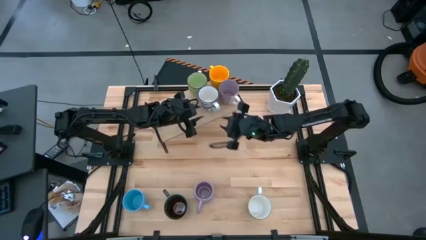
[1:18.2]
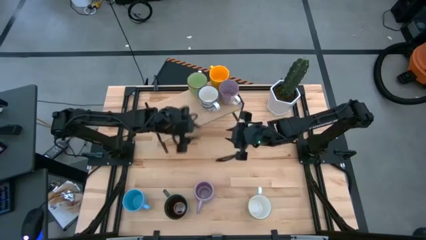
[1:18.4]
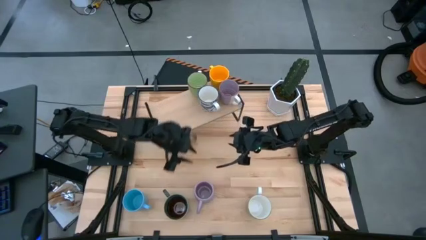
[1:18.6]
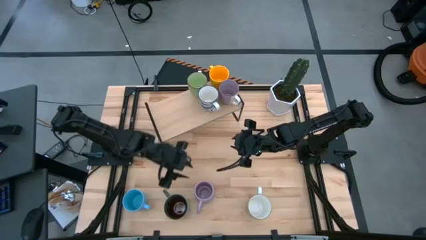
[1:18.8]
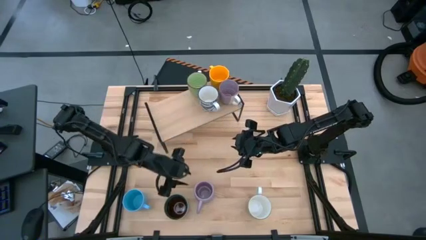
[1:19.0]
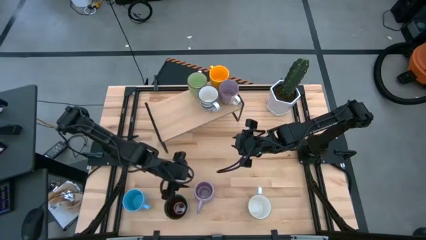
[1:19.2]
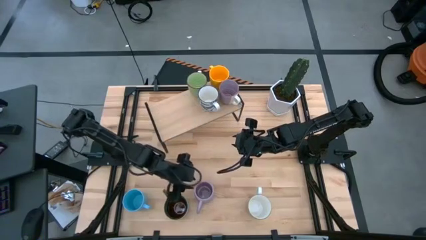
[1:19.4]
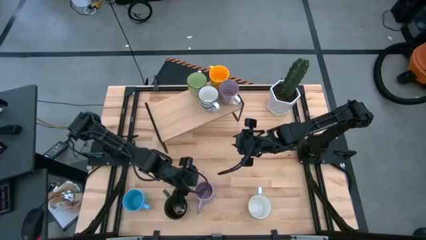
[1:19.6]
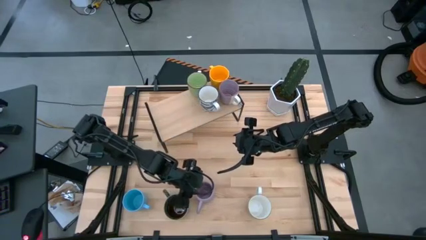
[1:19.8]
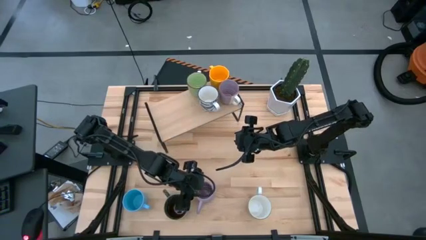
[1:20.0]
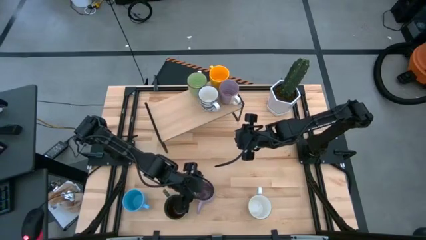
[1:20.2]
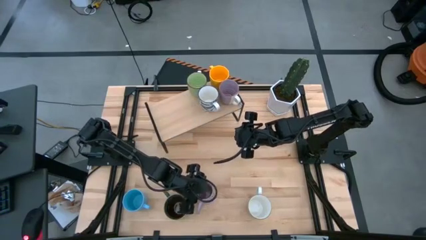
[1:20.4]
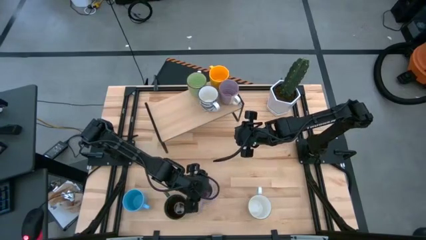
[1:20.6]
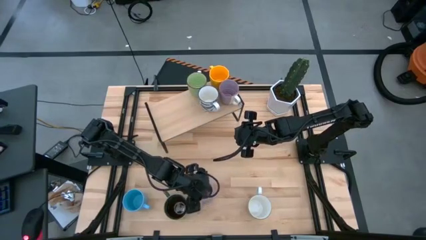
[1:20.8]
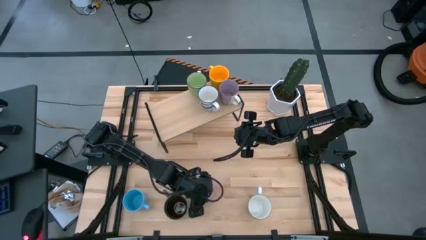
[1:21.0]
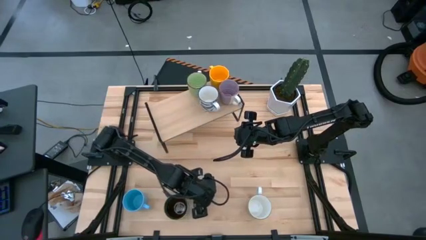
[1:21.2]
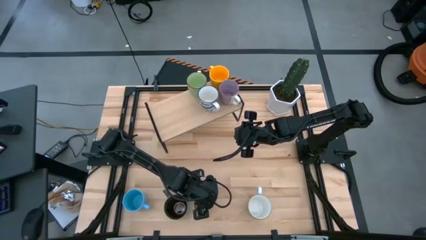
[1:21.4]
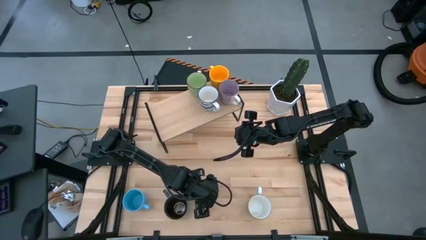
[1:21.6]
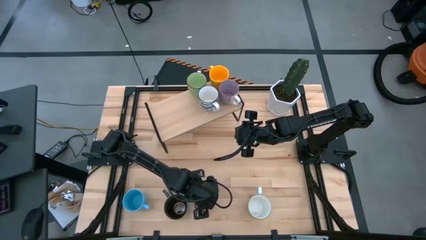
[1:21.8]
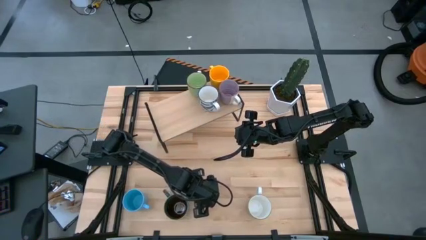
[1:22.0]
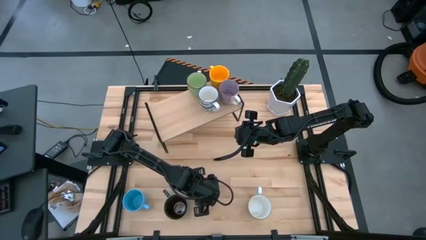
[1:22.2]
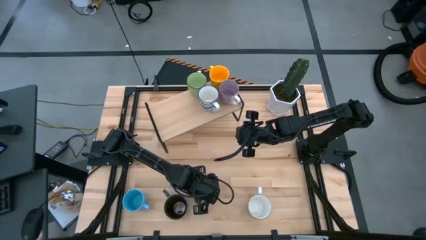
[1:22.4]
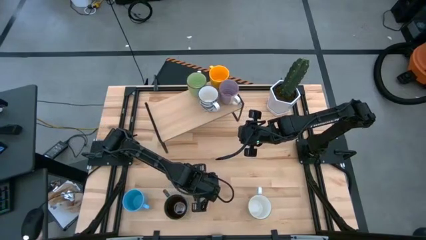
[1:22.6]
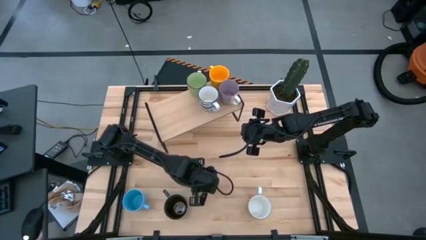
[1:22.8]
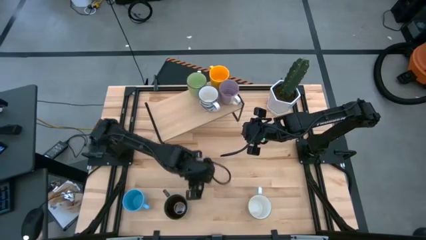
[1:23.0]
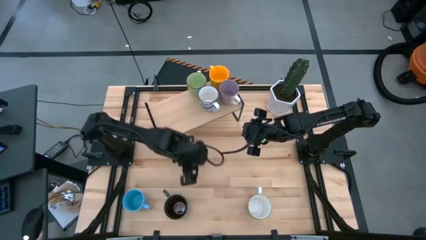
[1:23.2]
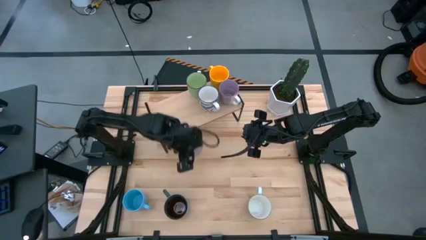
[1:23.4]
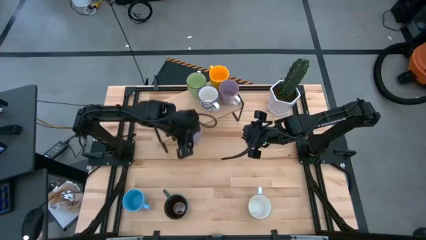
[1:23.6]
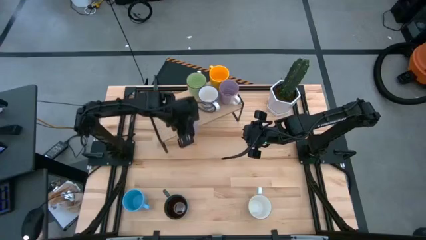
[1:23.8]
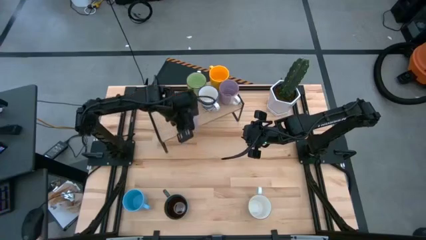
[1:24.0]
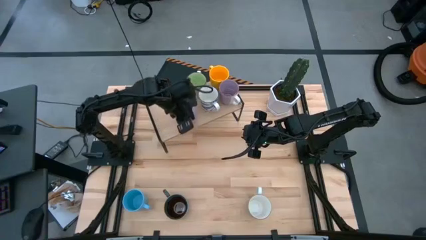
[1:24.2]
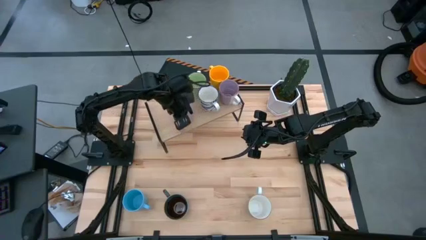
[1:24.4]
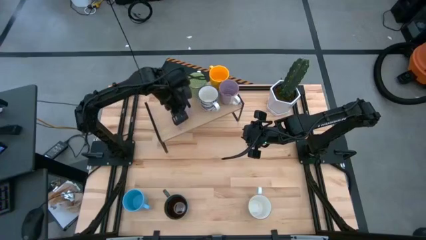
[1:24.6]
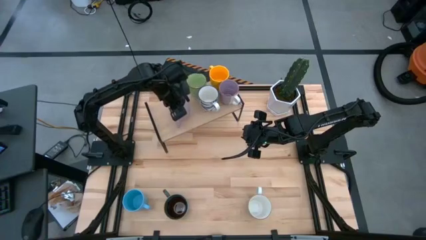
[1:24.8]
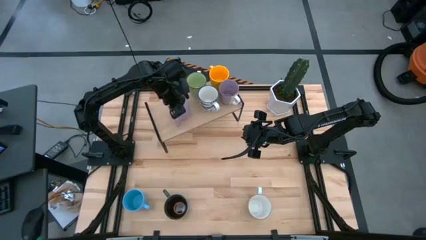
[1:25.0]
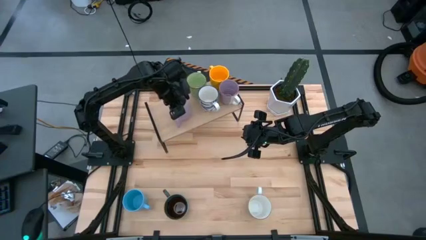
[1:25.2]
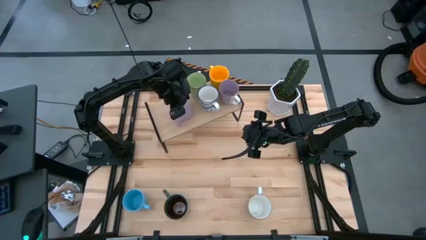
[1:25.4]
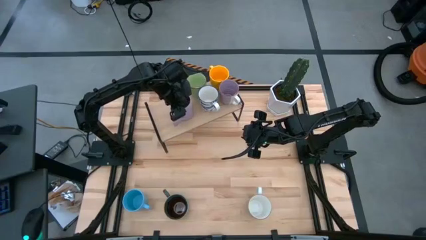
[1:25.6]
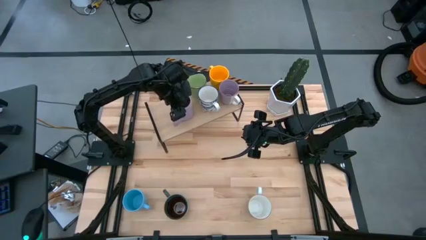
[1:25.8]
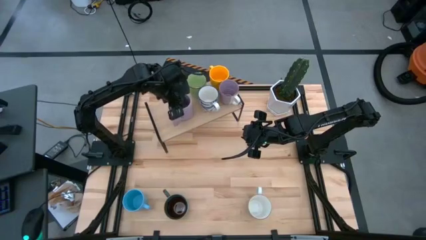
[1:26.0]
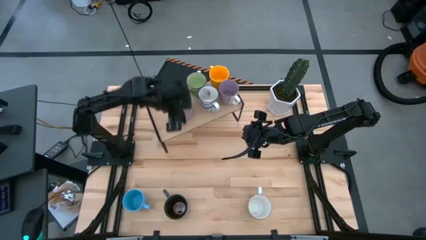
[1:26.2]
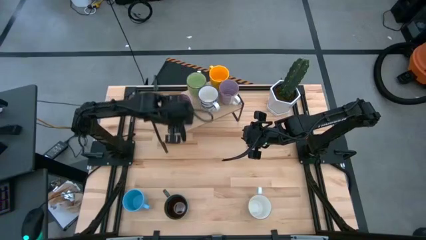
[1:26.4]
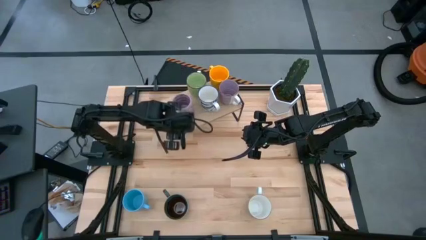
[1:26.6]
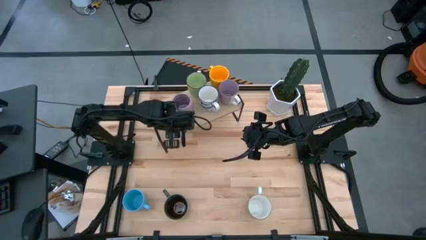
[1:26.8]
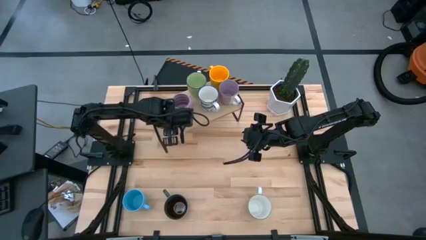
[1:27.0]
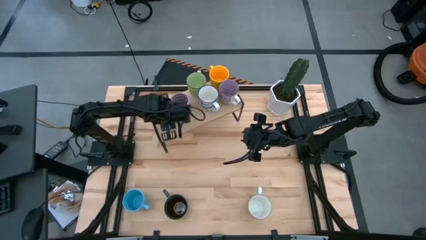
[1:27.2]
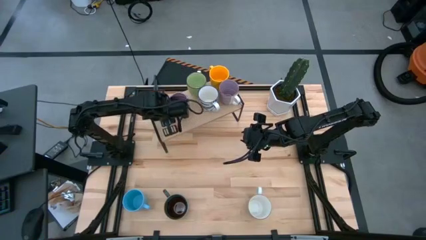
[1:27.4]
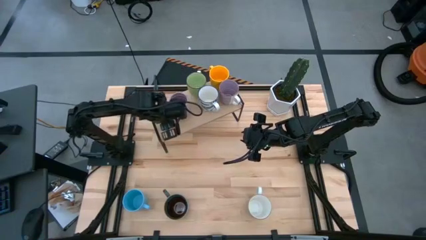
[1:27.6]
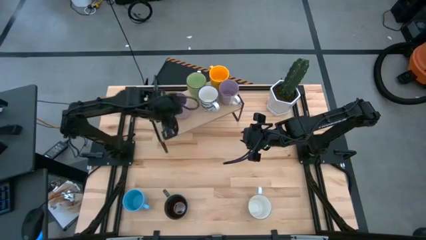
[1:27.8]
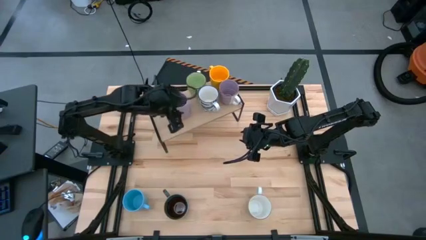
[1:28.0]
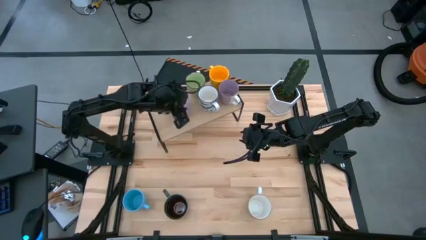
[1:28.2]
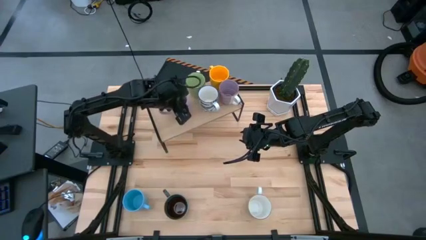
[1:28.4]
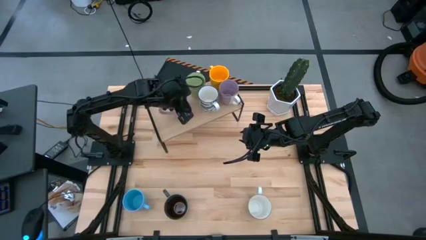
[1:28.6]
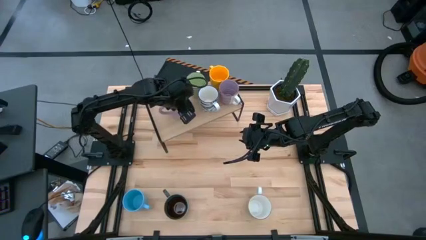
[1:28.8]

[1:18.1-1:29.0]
Task: Place coffee mugs
Put the purple mug on the shelf
